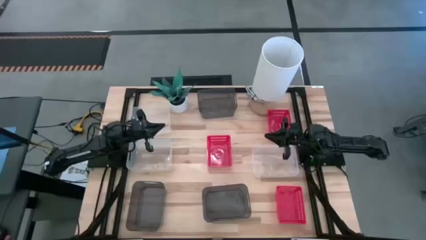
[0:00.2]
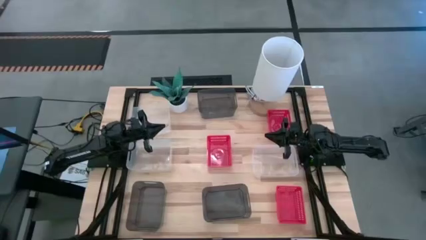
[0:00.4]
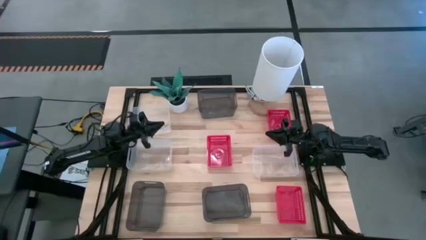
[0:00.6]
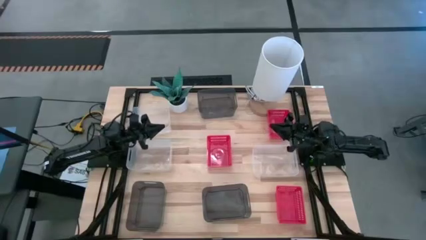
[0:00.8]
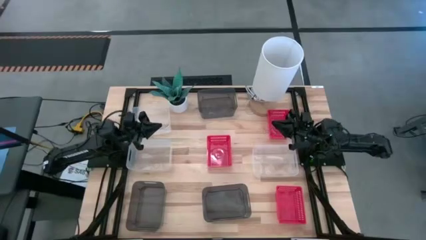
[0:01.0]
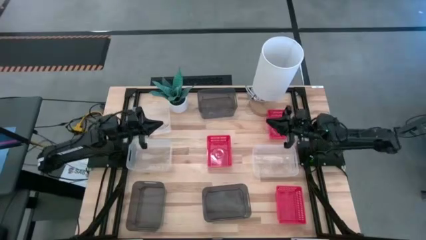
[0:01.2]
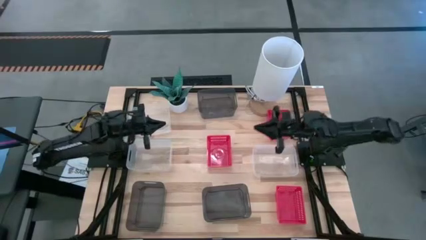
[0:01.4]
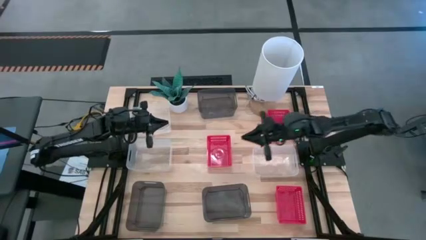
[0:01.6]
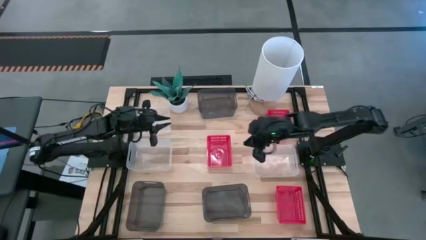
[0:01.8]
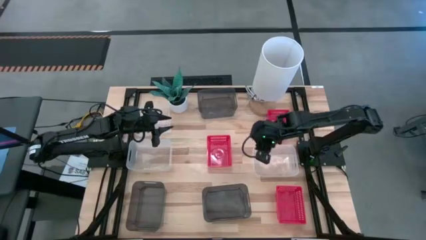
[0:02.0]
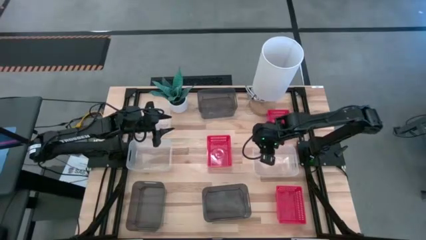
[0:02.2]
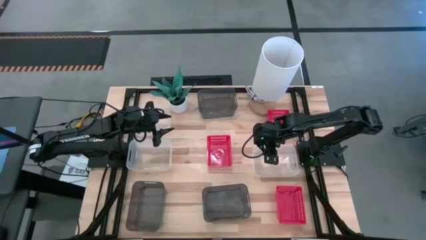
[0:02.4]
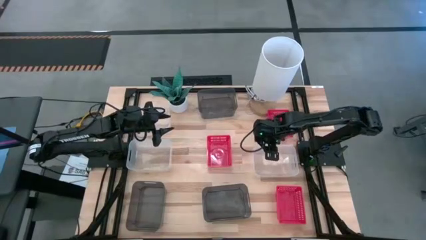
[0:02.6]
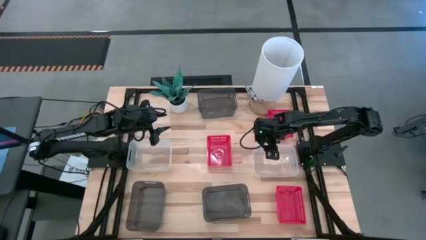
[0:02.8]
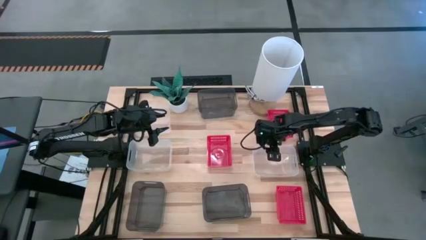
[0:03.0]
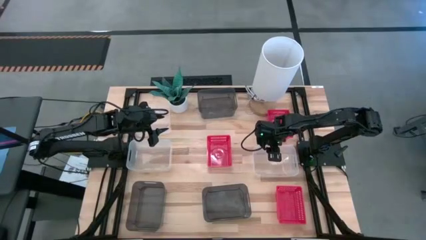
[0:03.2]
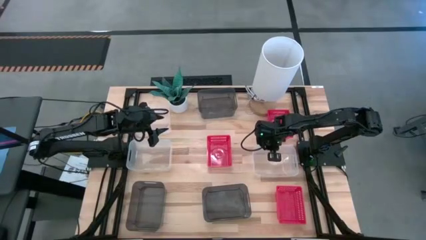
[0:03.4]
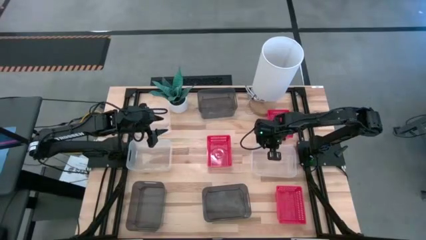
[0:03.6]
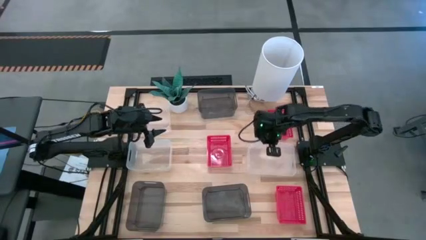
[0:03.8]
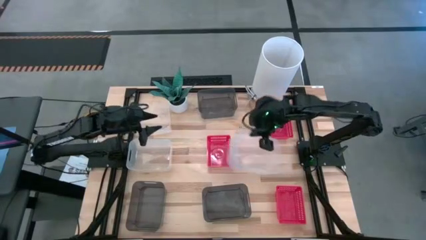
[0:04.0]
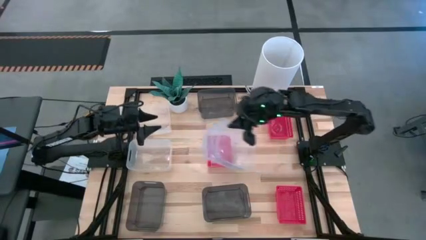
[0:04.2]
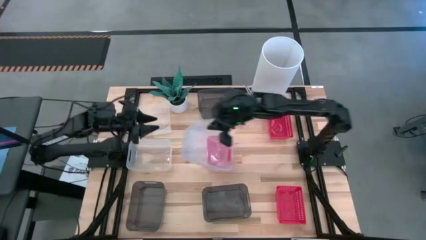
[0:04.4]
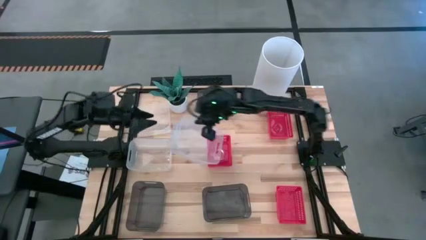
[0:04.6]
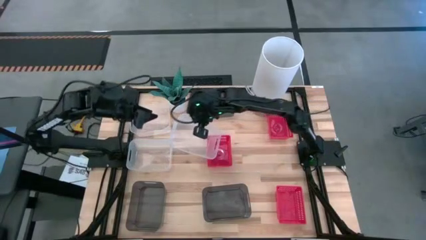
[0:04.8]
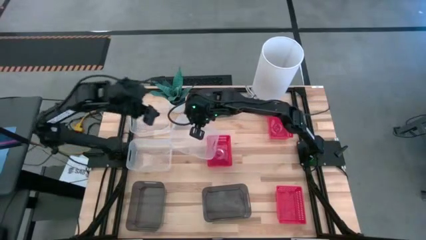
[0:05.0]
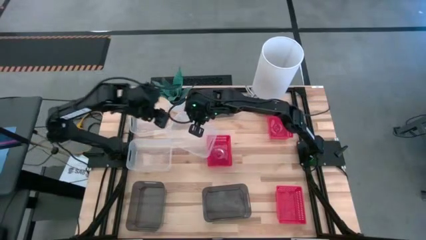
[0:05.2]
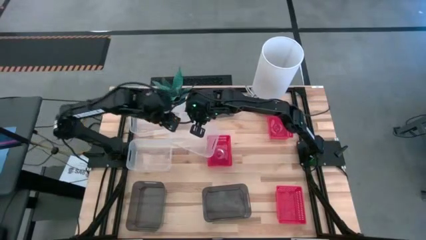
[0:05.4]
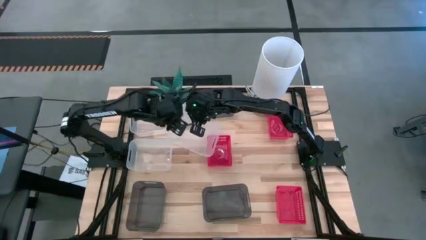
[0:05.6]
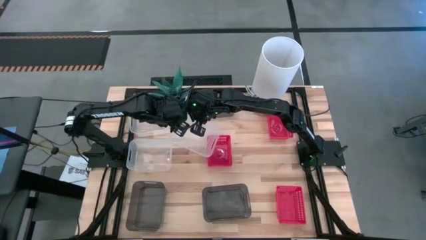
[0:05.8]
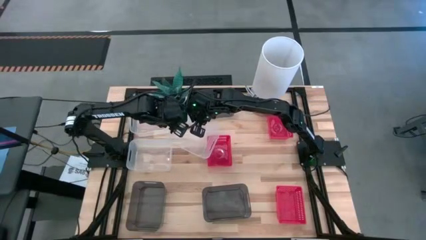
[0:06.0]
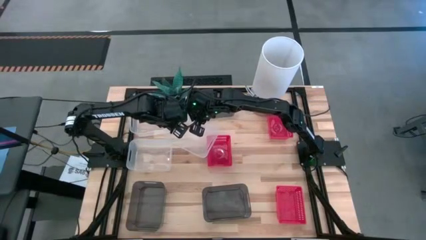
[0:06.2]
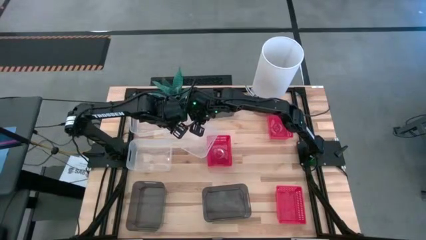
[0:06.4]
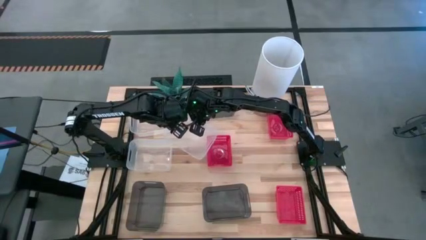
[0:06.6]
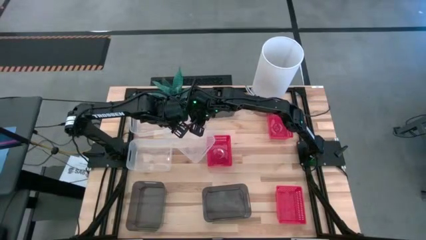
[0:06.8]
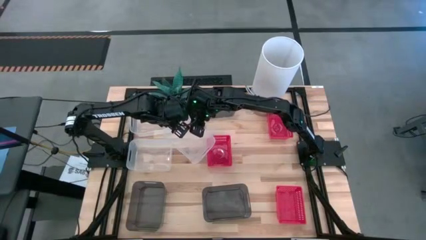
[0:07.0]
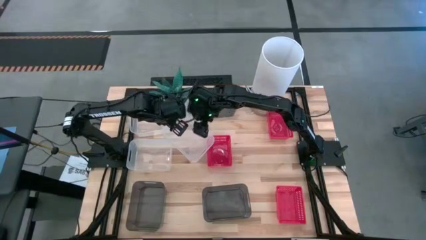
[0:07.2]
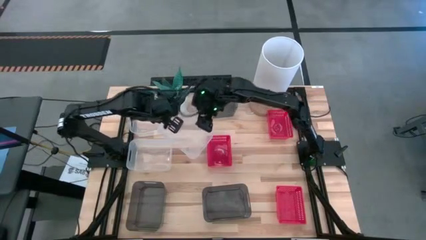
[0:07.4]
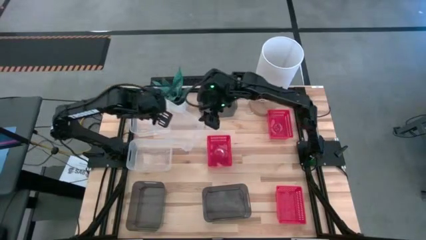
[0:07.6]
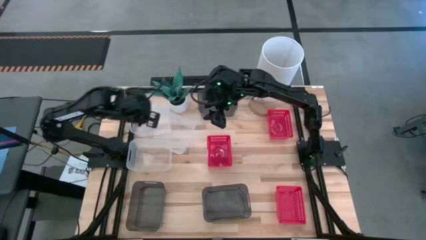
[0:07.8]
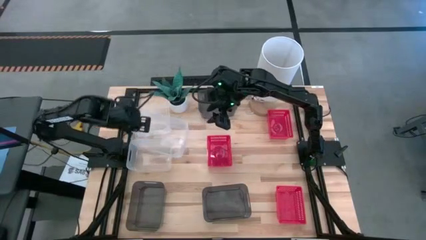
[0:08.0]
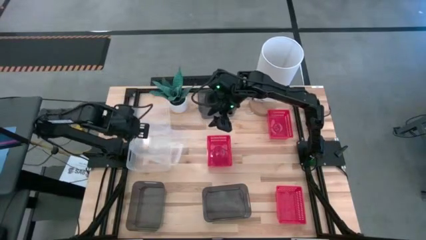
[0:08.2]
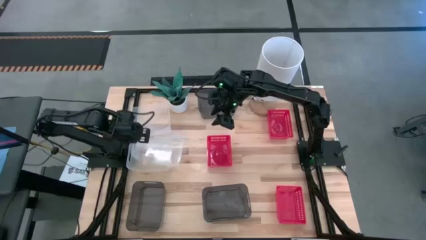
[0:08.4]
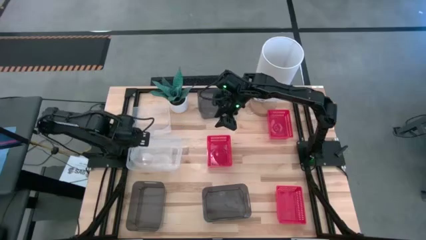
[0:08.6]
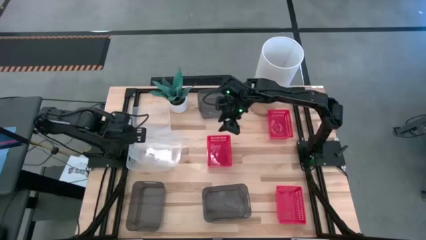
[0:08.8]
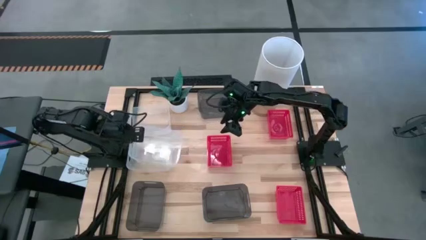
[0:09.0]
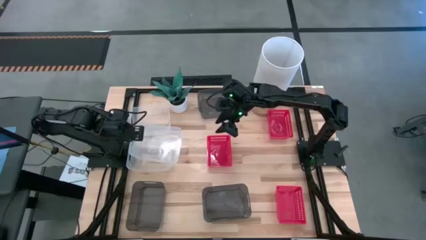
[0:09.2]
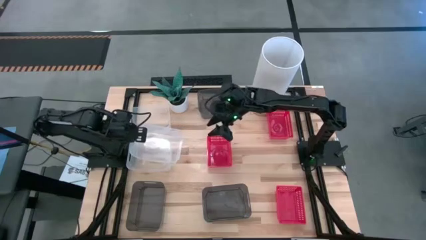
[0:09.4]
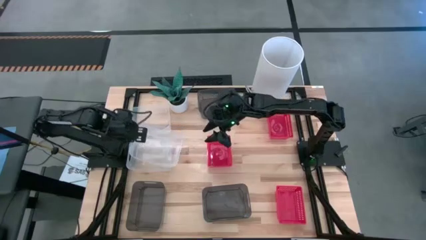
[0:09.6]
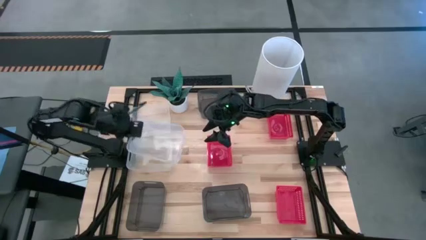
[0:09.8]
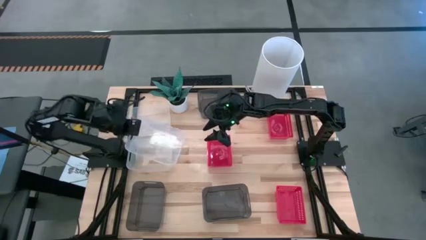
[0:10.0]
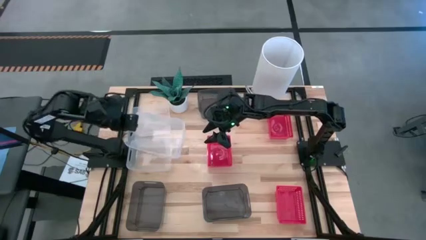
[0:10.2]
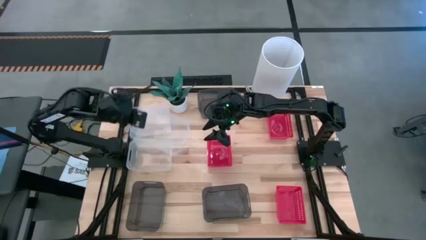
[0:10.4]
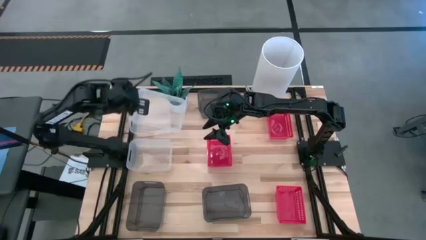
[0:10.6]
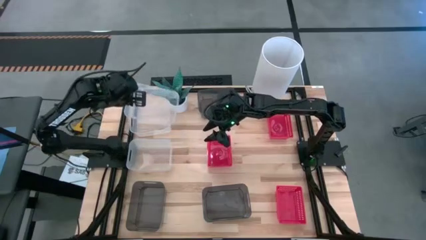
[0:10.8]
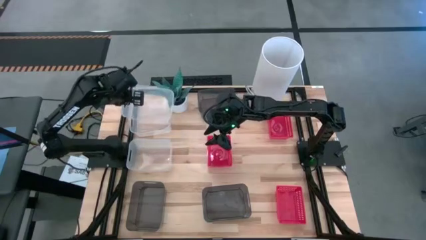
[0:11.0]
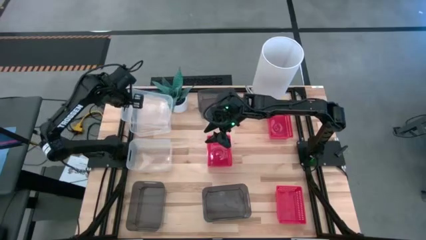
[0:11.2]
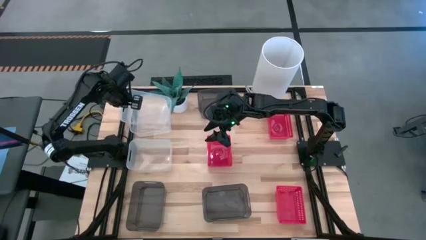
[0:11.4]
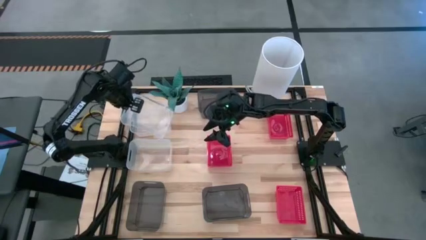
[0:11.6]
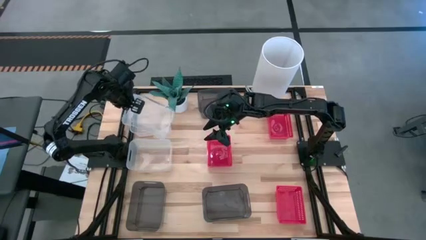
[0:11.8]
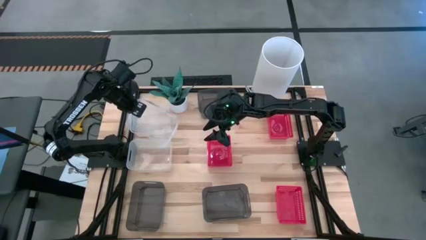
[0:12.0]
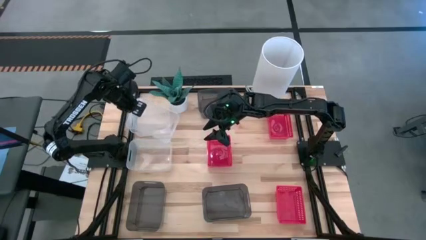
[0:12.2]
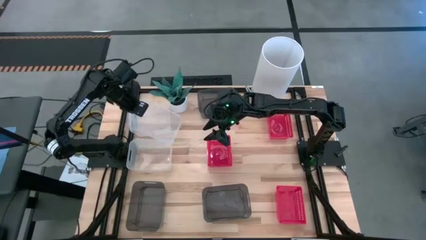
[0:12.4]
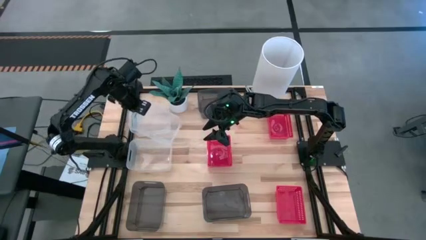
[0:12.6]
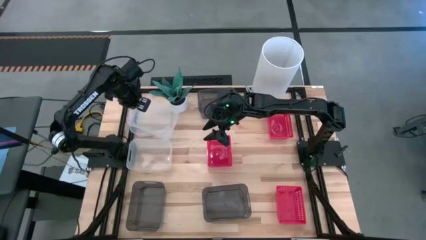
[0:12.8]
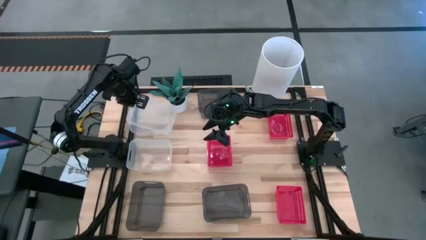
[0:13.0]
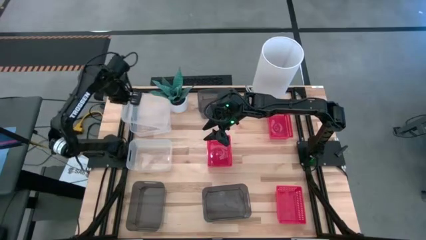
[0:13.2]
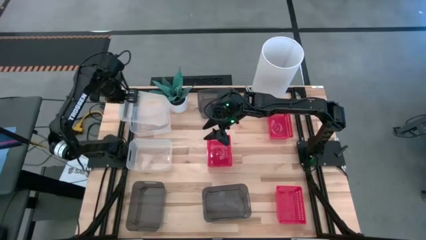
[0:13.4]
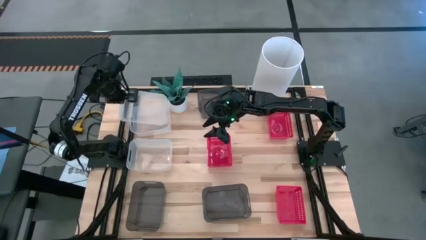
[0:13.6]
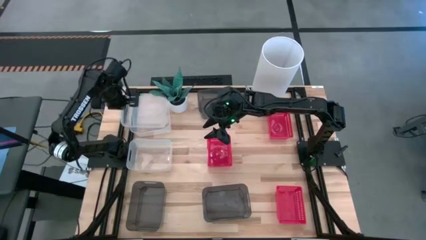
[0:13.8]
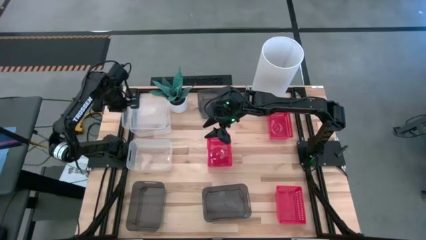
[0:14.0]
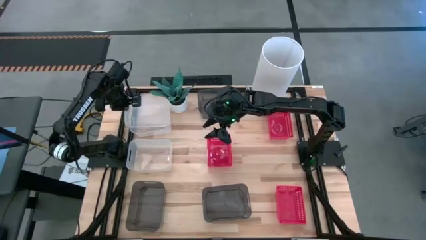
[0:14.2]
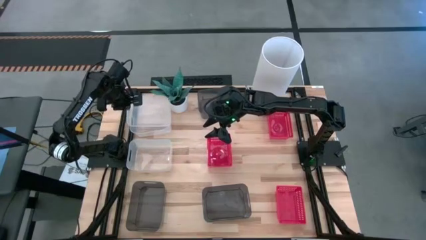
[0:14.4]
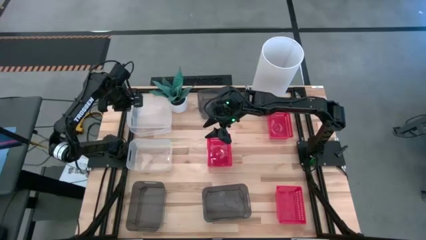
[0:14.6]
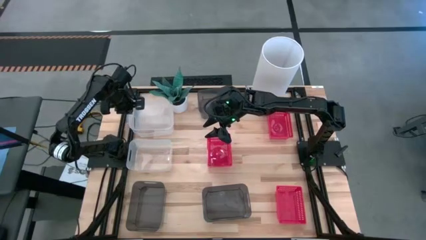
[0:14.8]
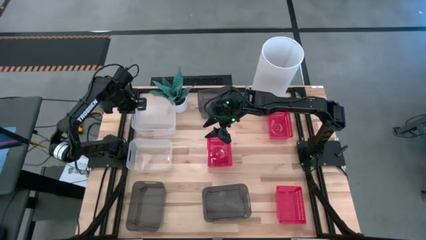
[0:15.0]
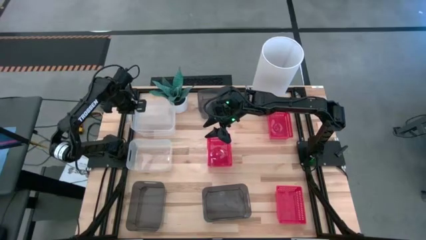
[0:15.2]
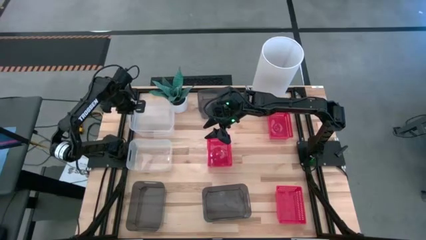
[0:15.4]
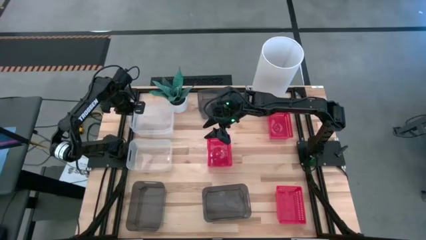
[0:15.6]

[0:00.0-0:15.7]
Stack the right transparent bin on the top left transparent bin
